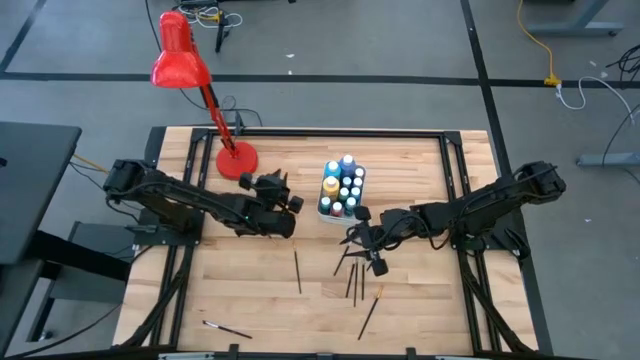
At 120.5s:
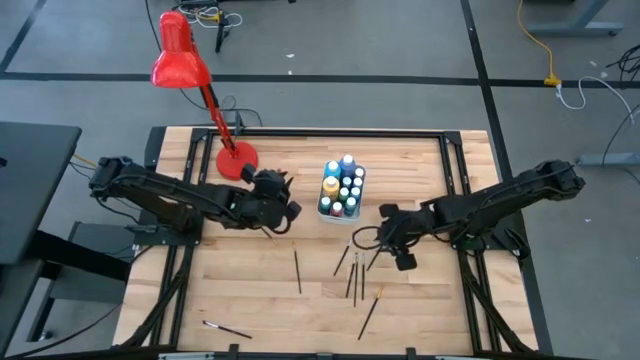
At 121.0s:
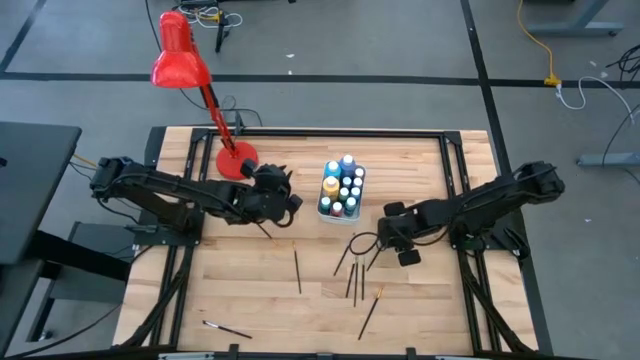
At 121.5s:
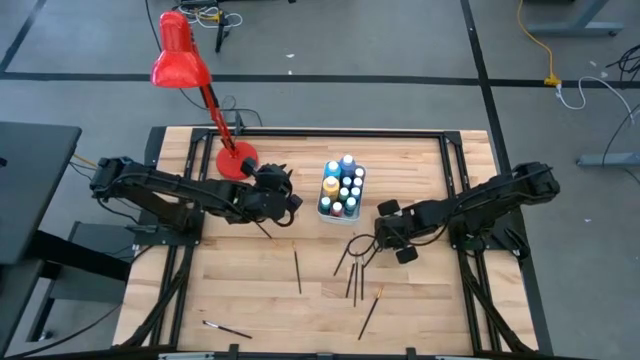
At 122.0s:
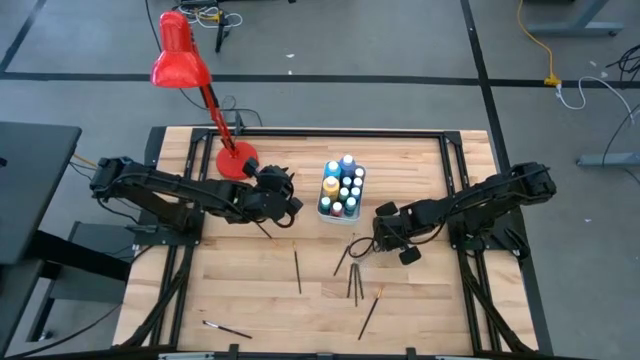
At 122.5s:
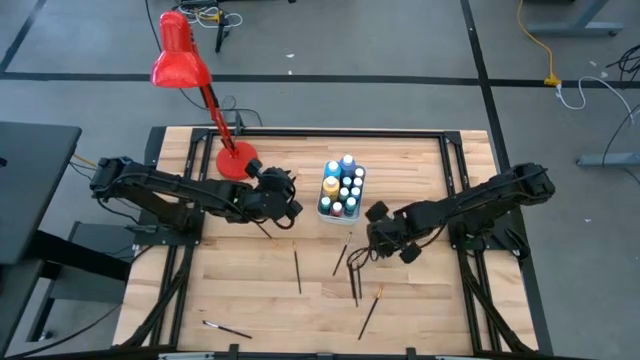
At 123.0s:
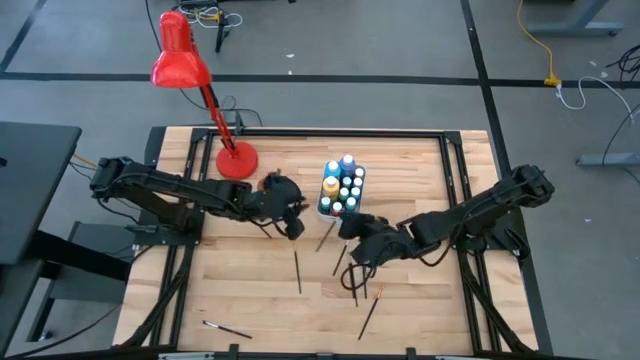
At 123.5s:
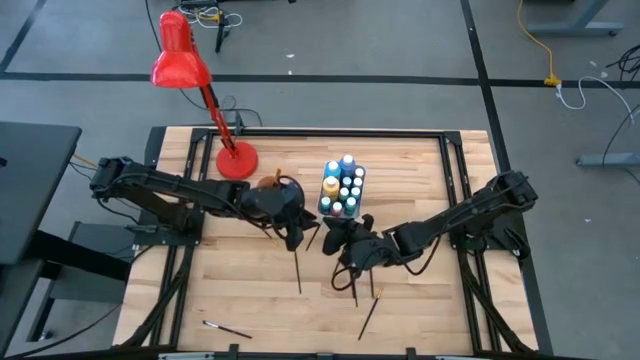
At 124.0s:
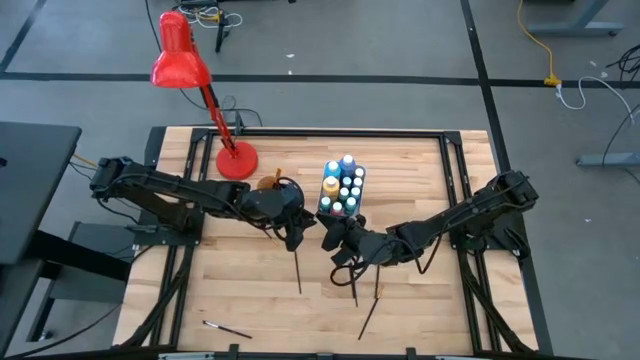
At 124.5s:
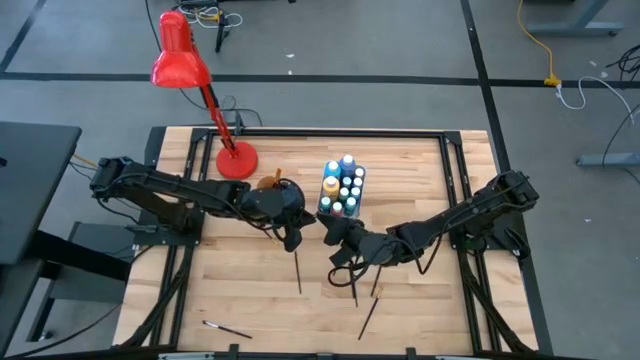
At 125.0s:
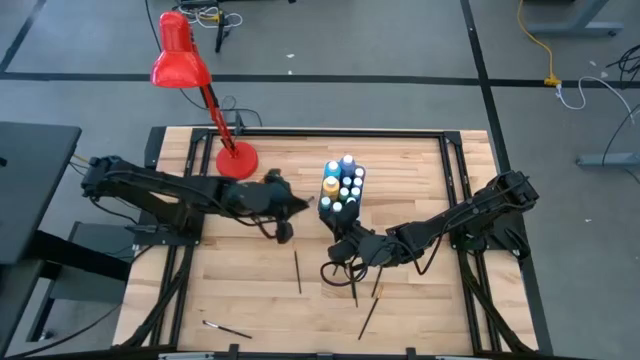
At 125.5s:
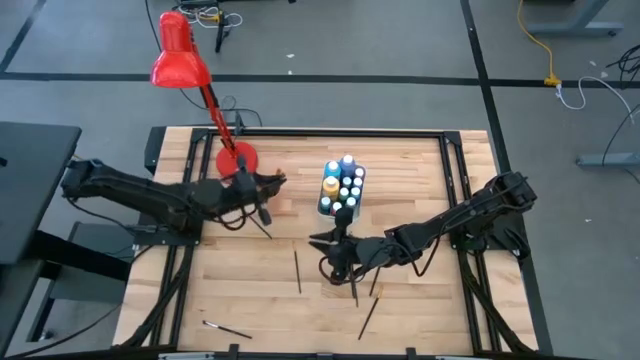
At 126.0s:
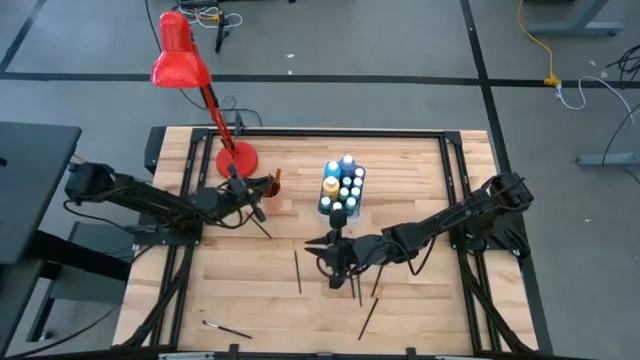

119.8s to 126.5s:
Task: Pick & Place Paint Supplies
Put the white paint brush into the orange cup

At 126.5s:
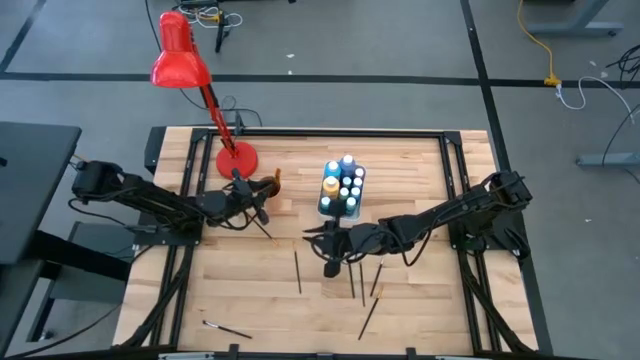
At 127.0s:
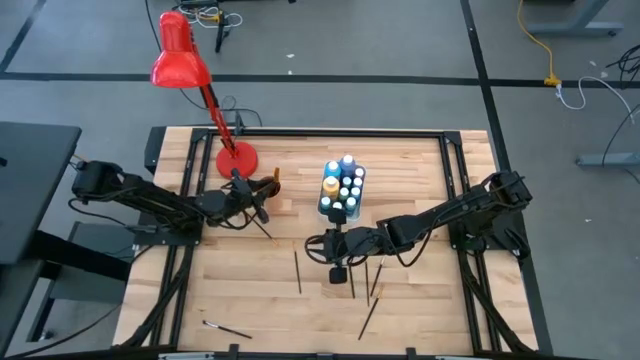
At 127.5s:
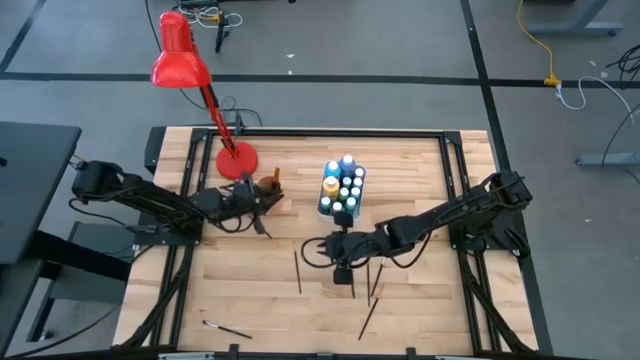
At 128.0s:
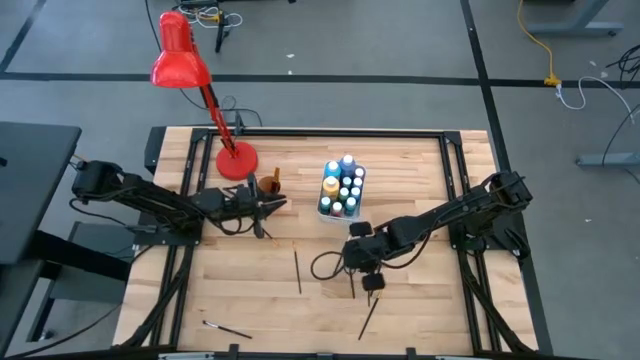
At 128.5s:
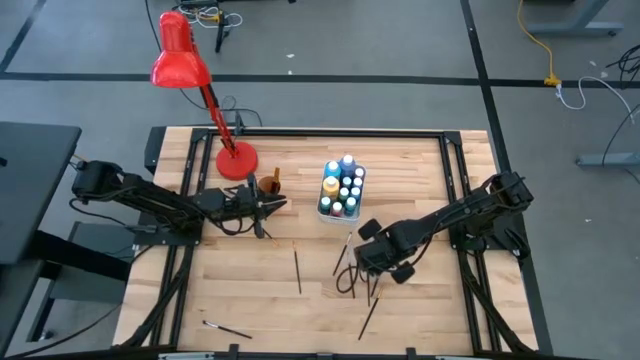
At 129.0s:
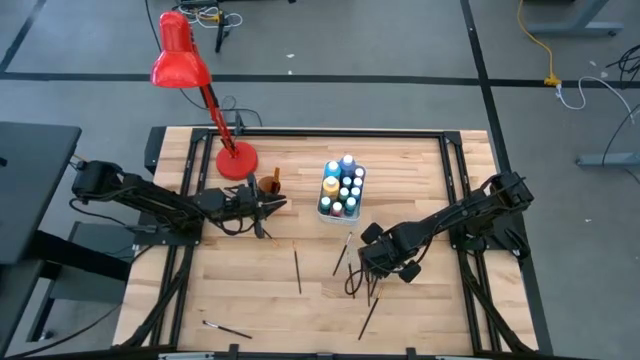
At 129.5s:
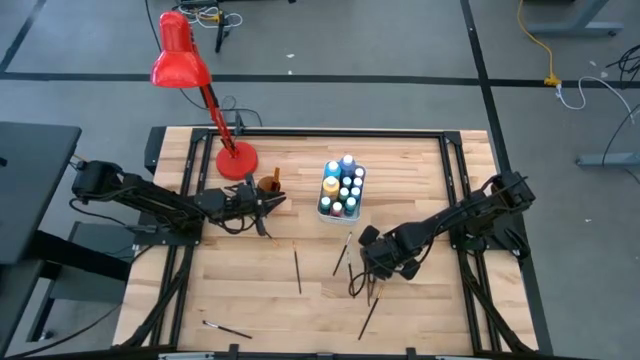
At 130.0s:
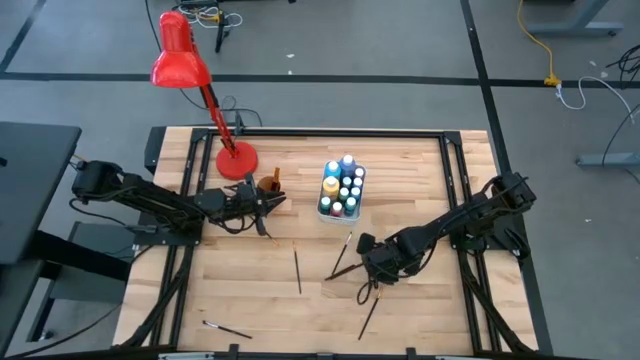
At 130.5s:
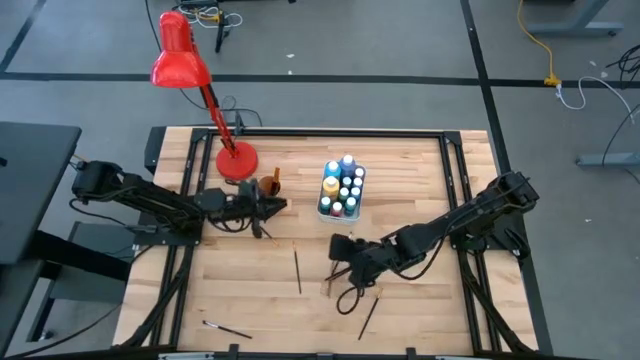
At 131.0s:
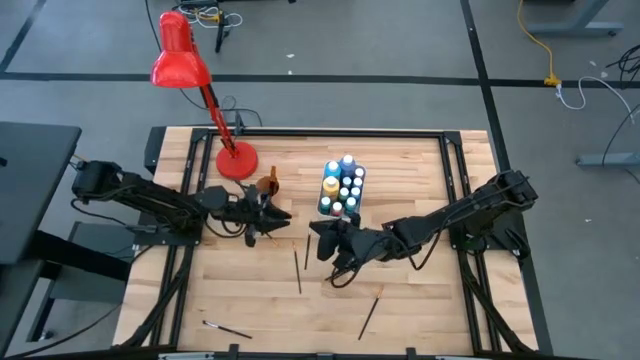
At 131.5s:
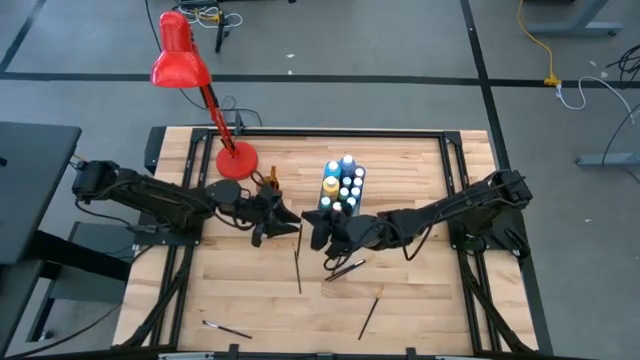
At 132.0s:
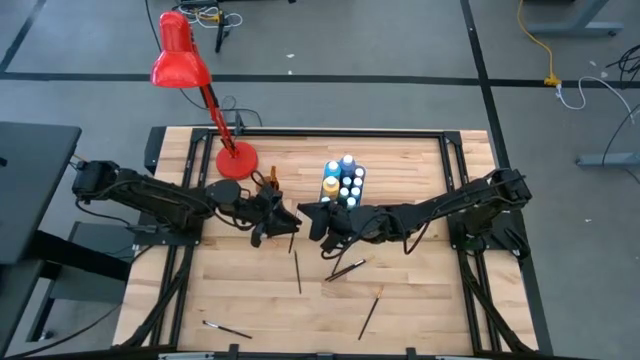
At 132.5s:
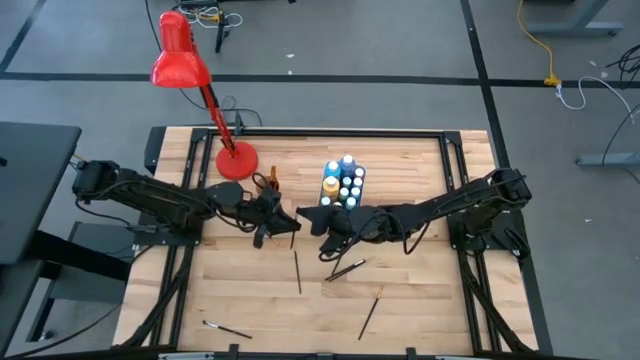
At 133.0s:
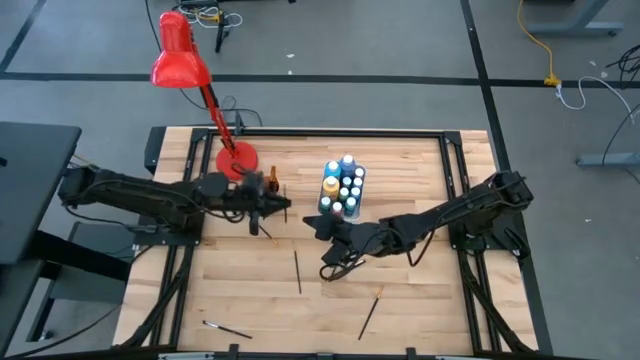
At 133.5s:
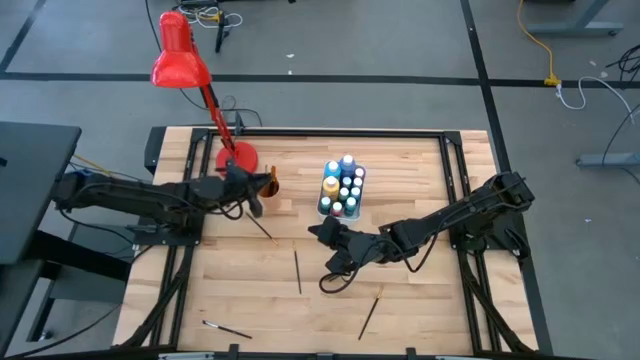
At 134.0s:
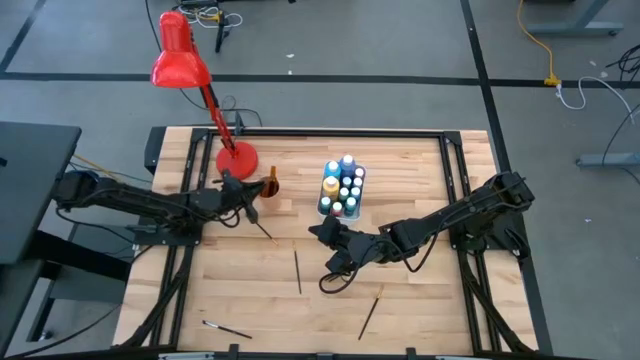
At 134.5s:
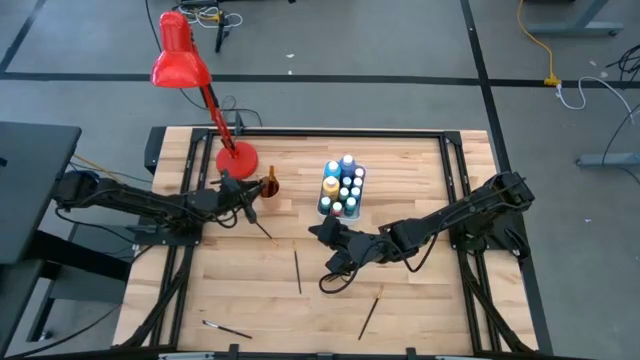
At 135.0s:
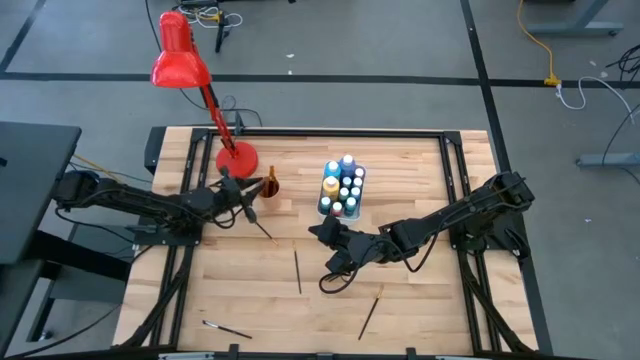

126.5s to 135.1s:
Put the white paint brush into the orange cup

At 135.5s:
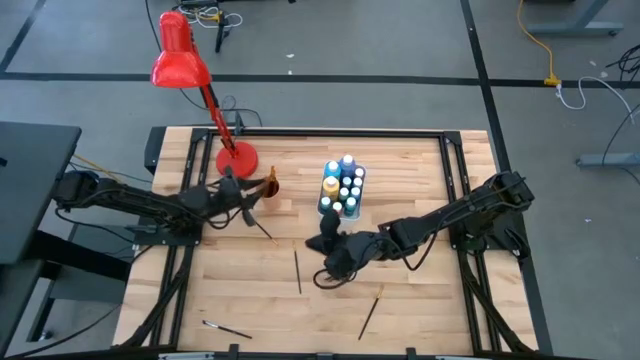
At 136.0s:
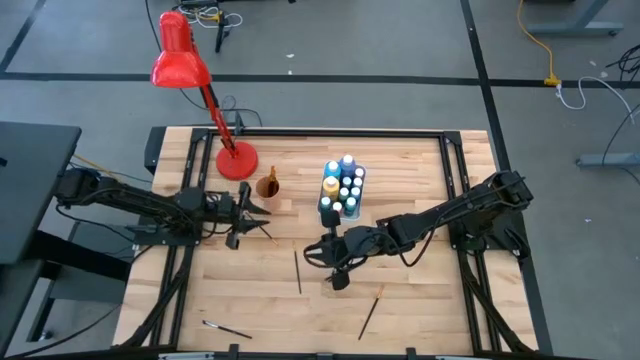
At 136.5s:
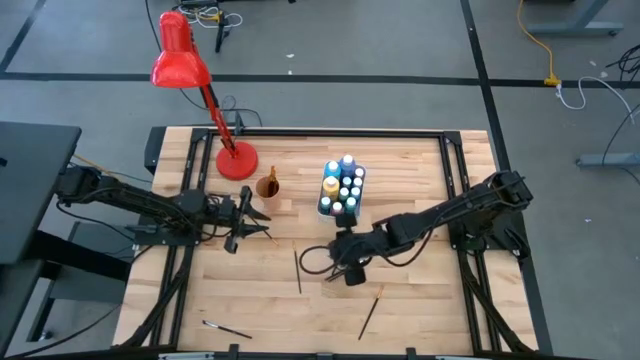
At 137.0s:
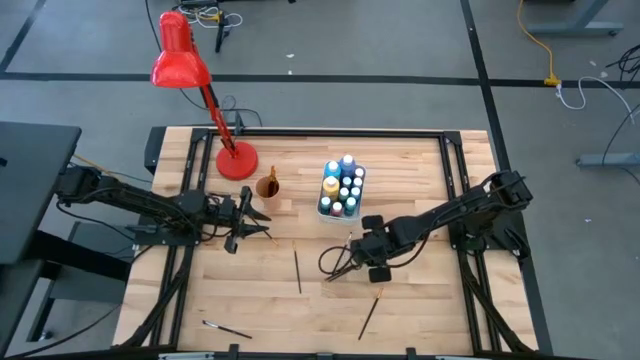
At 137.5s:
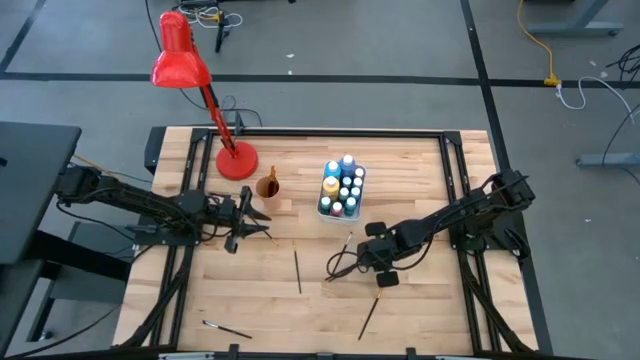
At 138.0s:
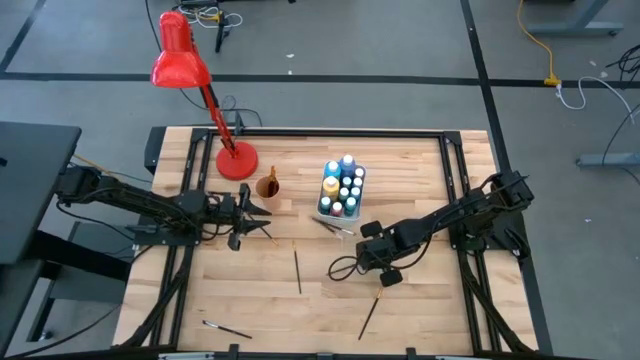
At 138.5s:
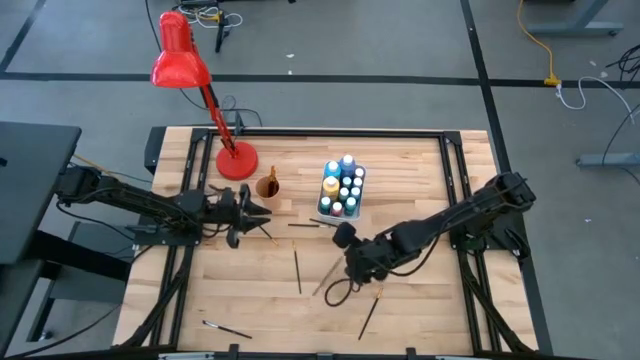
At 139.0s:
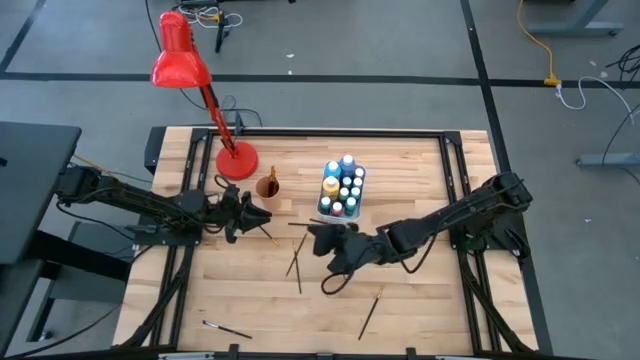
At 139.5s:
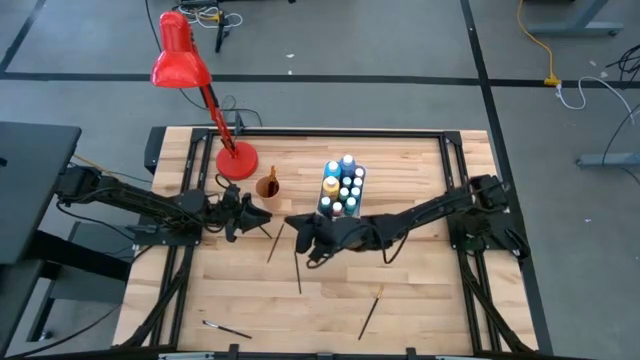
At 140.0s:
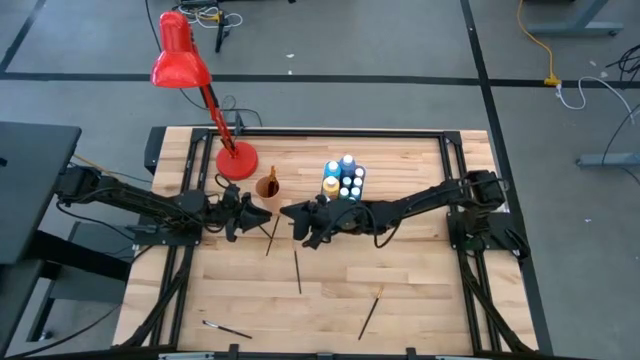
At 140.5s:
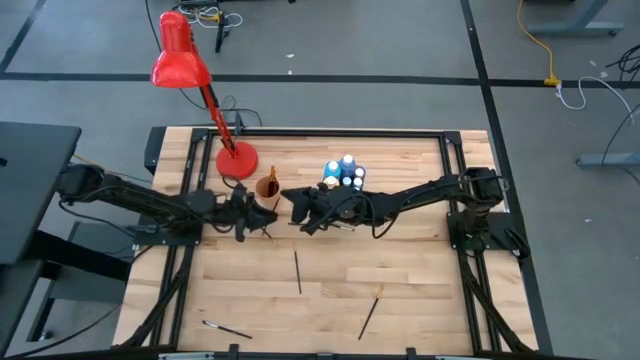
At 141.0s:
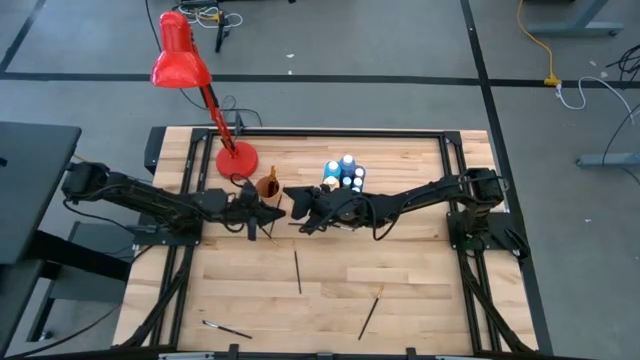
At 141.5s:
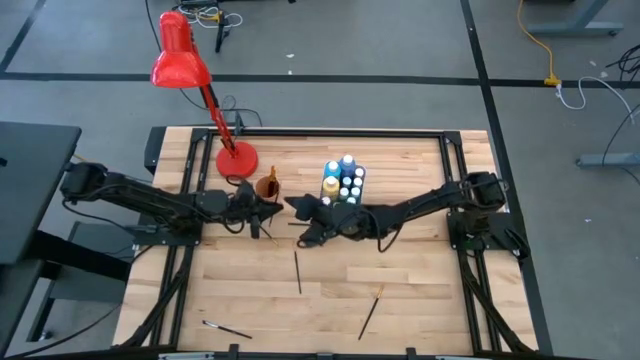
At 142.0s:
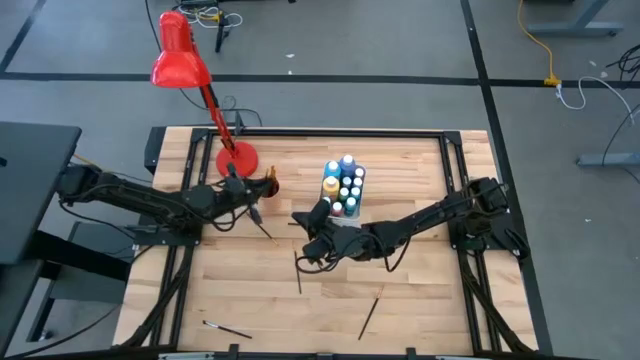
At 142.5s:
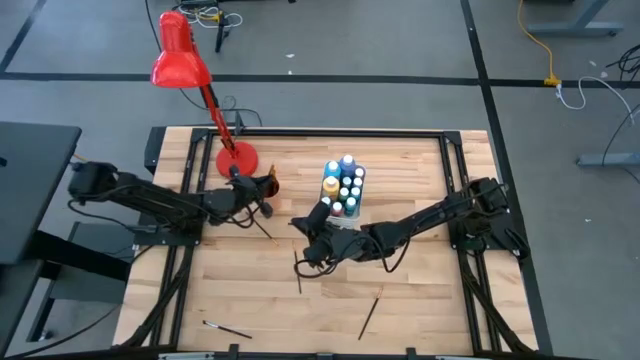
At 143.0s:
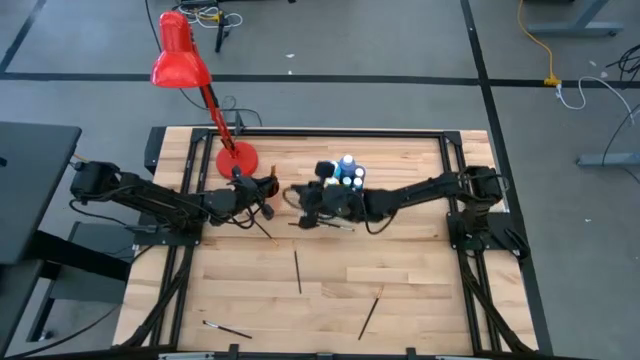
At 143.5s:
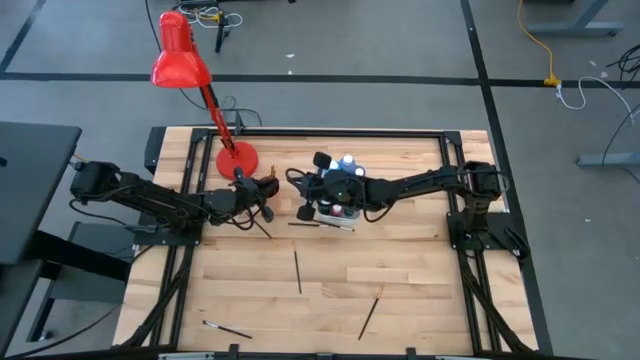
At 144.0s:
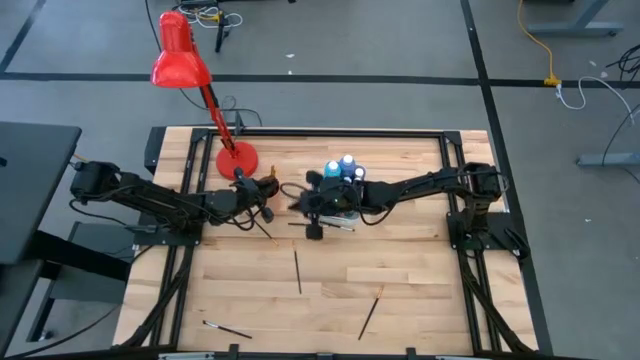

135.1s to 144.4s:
Put the yellow paint brush into the orange cup
